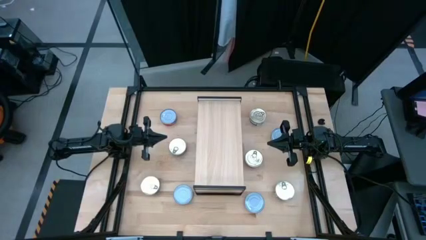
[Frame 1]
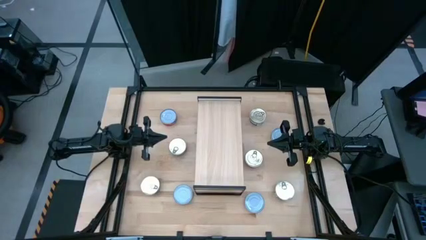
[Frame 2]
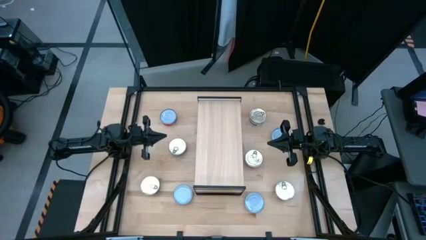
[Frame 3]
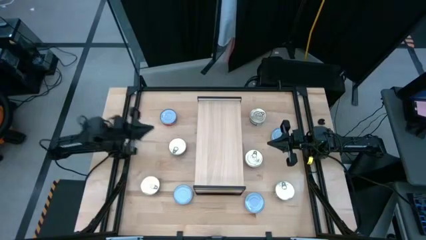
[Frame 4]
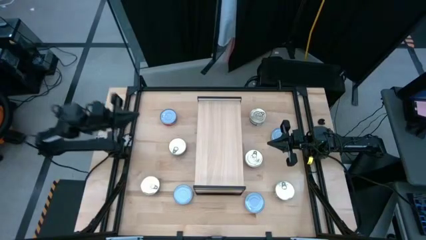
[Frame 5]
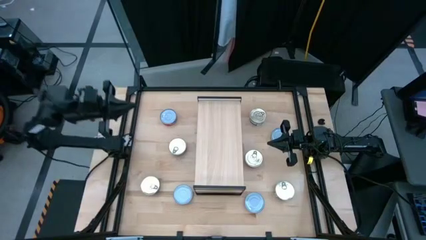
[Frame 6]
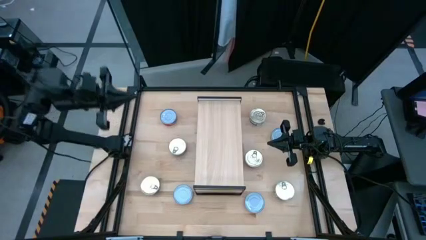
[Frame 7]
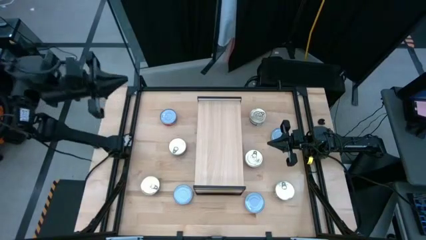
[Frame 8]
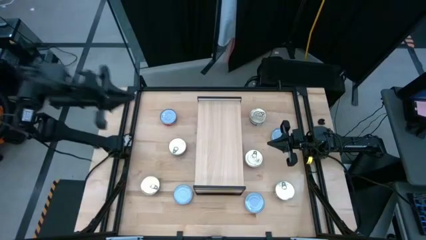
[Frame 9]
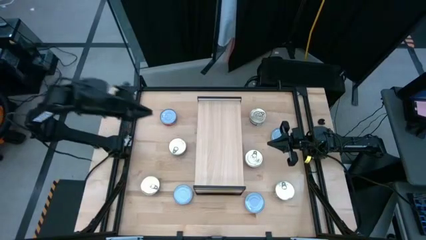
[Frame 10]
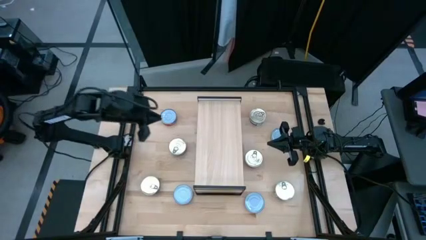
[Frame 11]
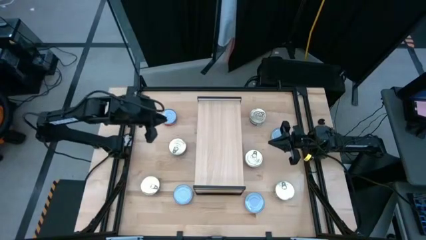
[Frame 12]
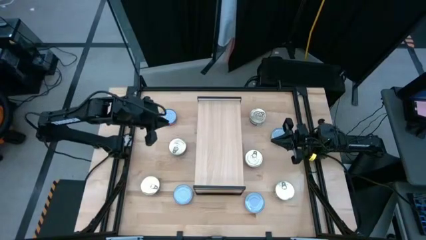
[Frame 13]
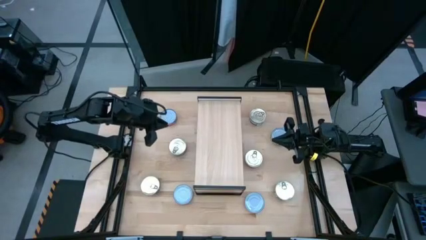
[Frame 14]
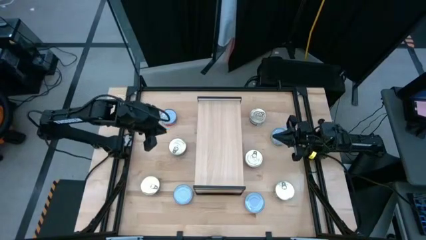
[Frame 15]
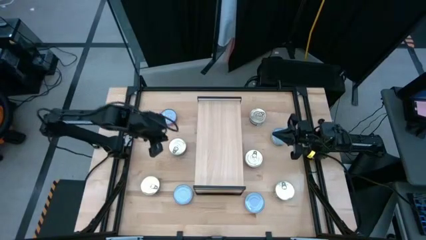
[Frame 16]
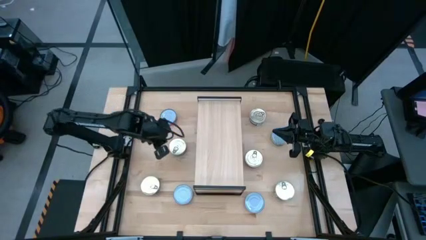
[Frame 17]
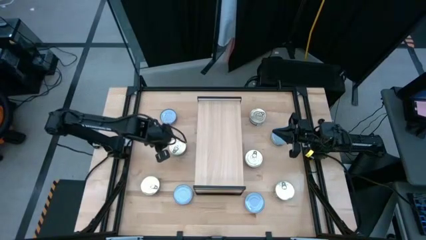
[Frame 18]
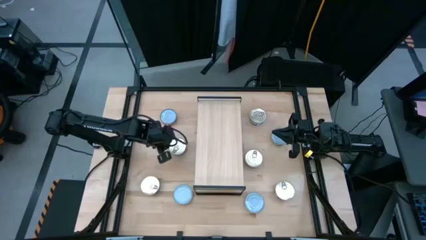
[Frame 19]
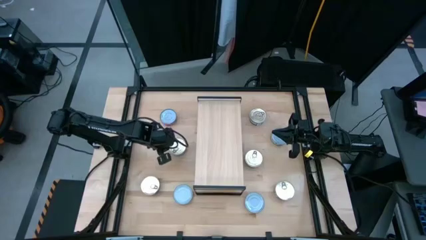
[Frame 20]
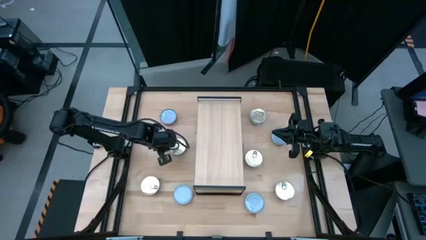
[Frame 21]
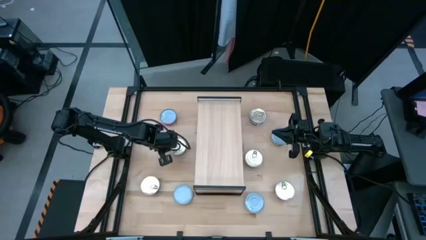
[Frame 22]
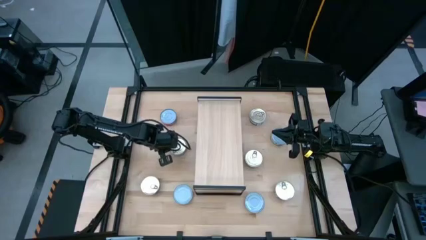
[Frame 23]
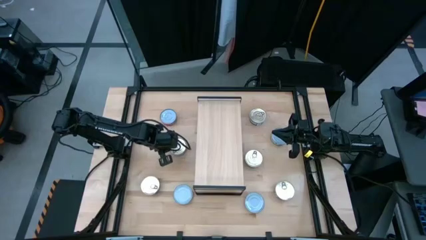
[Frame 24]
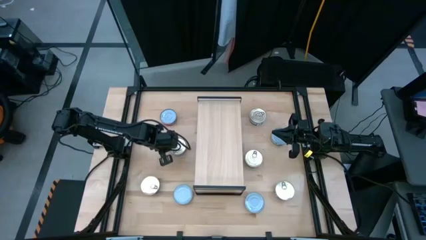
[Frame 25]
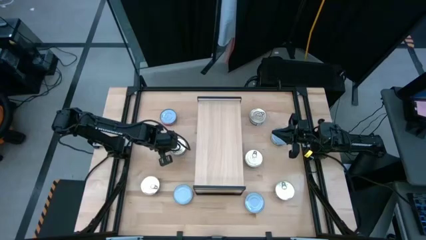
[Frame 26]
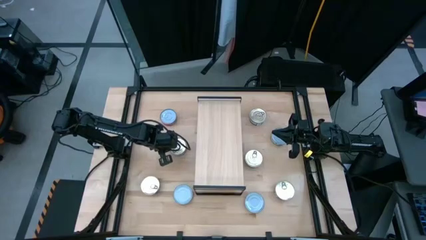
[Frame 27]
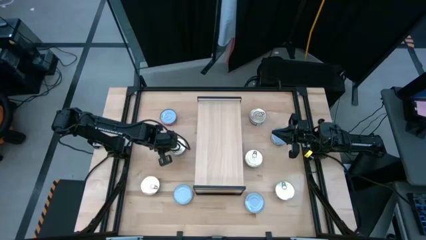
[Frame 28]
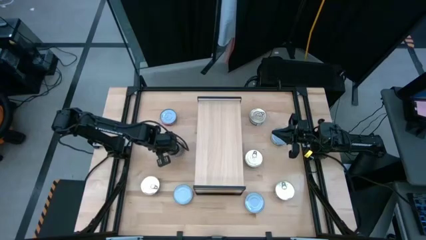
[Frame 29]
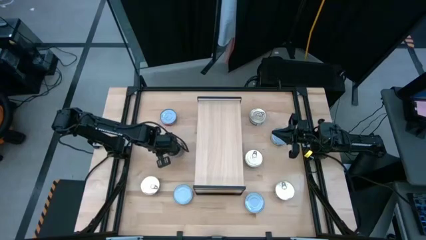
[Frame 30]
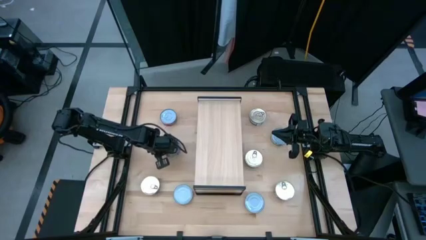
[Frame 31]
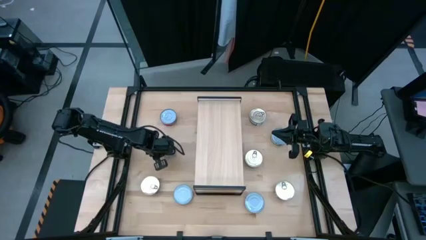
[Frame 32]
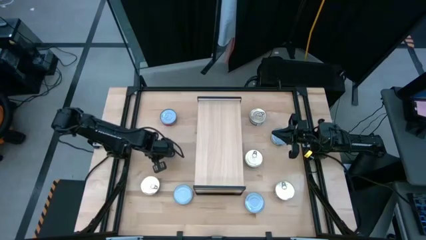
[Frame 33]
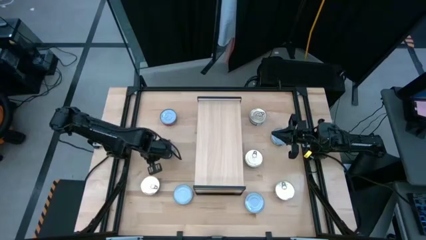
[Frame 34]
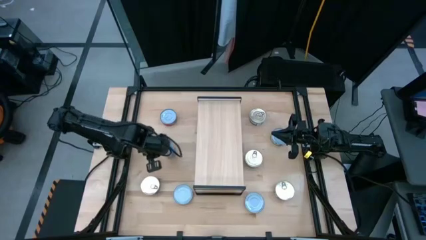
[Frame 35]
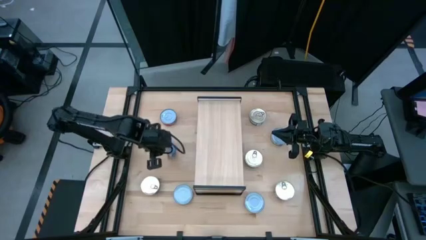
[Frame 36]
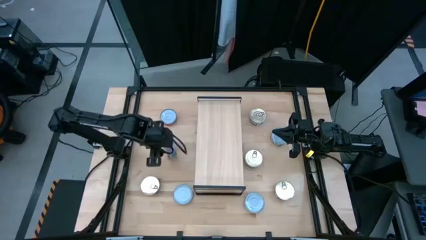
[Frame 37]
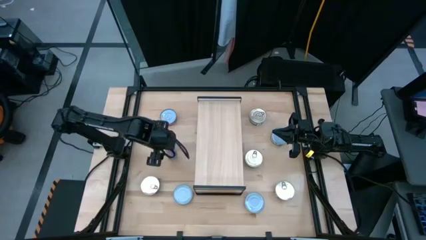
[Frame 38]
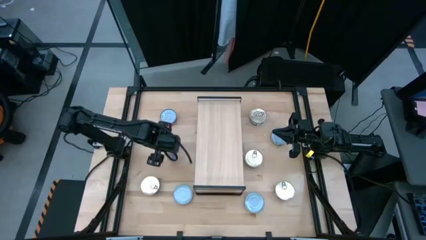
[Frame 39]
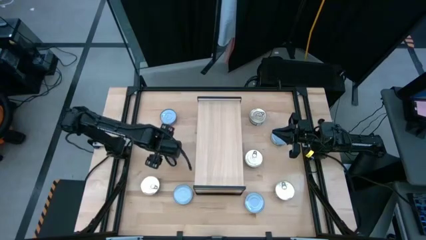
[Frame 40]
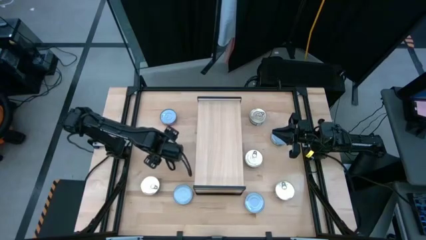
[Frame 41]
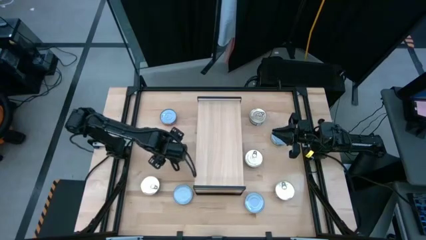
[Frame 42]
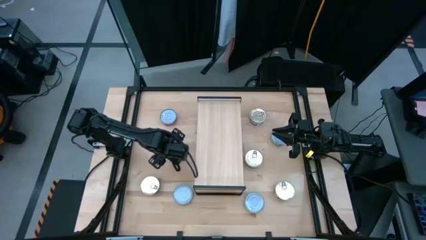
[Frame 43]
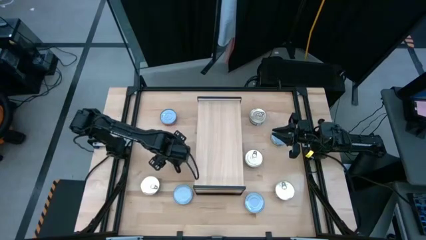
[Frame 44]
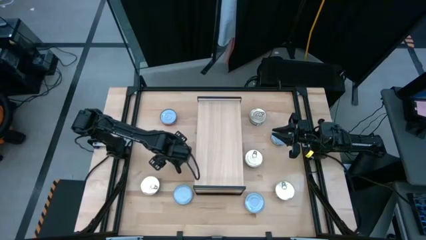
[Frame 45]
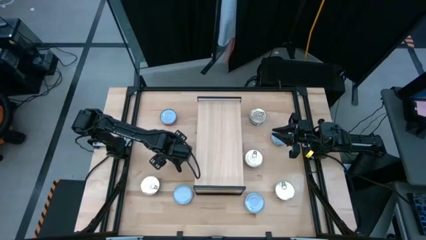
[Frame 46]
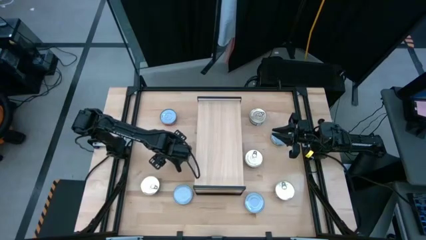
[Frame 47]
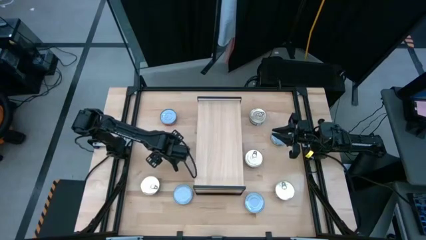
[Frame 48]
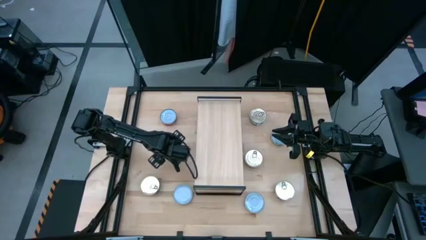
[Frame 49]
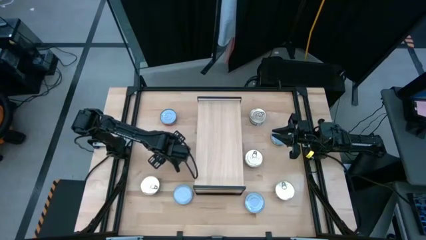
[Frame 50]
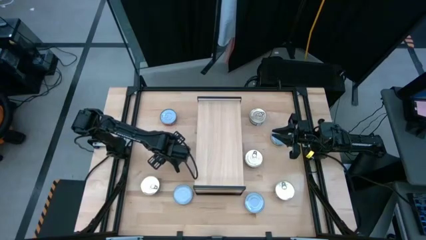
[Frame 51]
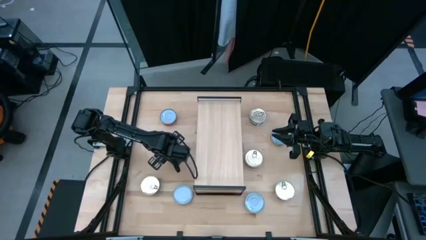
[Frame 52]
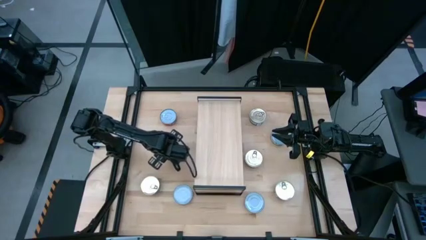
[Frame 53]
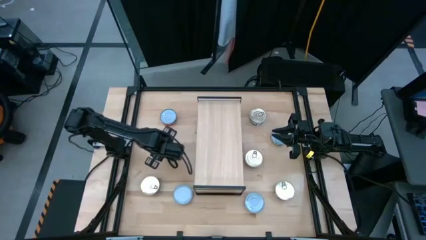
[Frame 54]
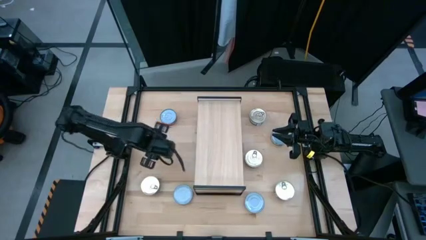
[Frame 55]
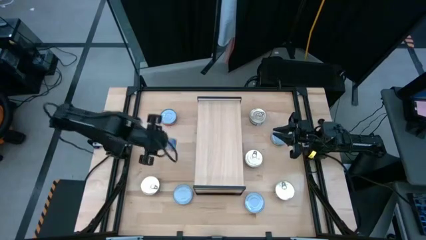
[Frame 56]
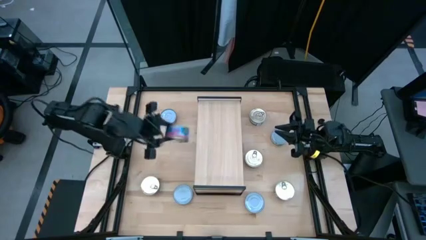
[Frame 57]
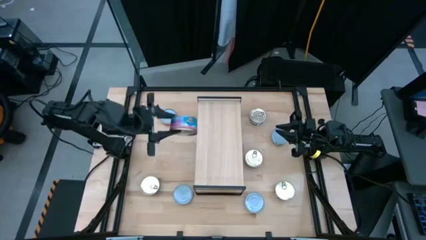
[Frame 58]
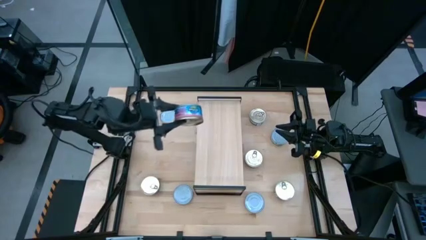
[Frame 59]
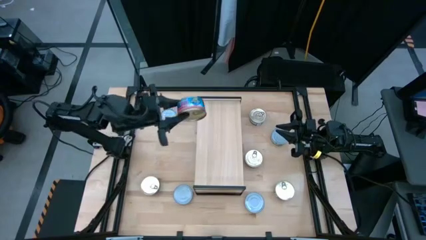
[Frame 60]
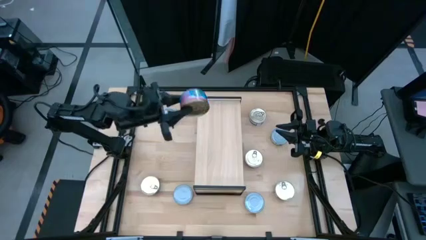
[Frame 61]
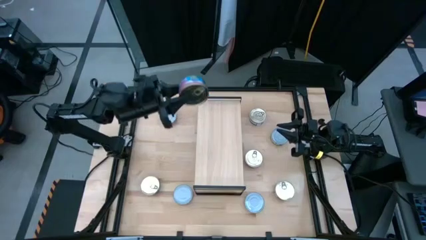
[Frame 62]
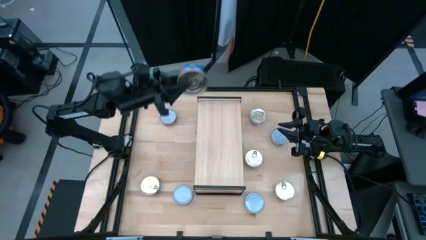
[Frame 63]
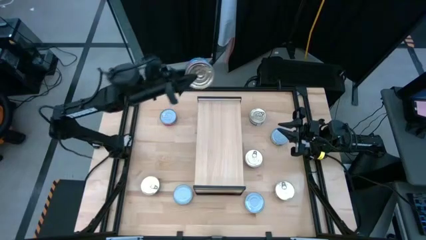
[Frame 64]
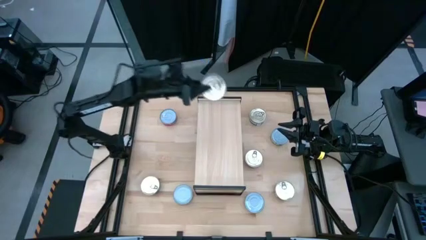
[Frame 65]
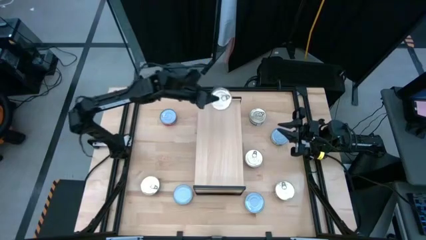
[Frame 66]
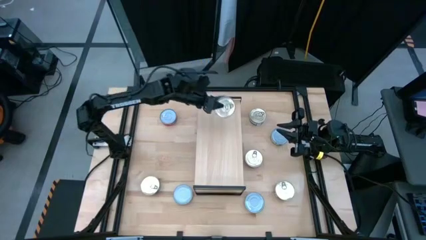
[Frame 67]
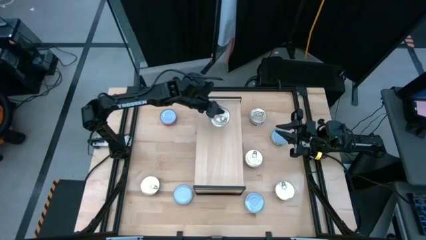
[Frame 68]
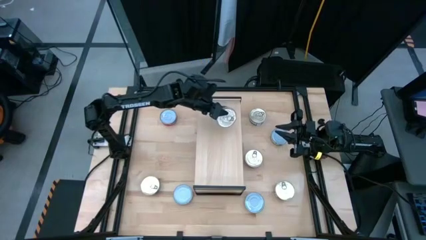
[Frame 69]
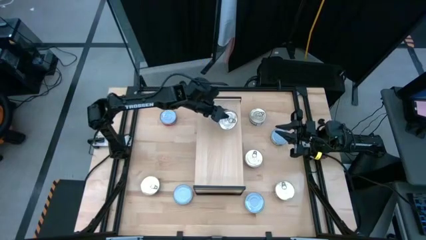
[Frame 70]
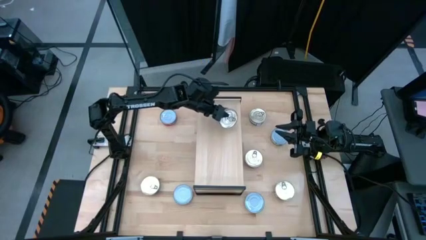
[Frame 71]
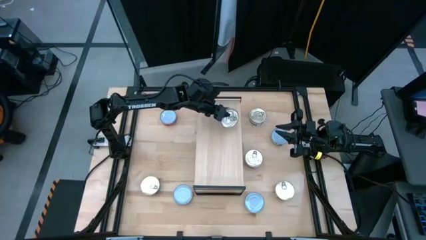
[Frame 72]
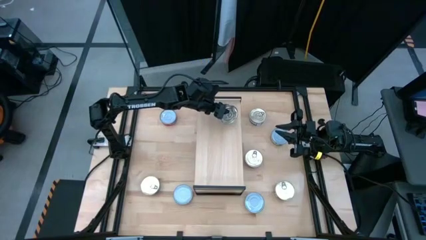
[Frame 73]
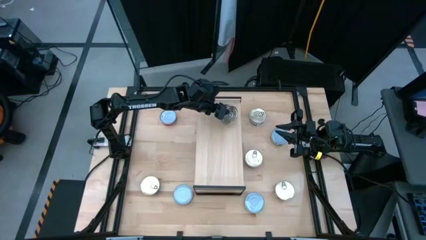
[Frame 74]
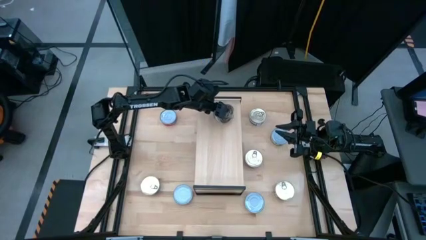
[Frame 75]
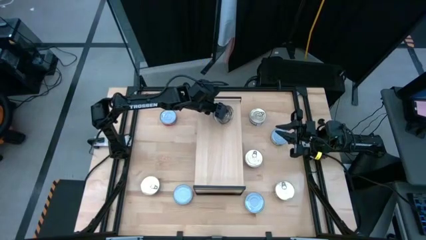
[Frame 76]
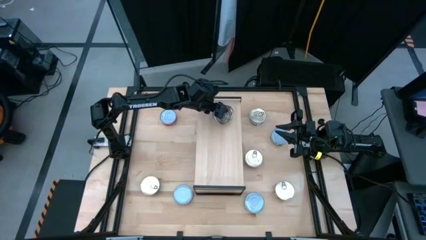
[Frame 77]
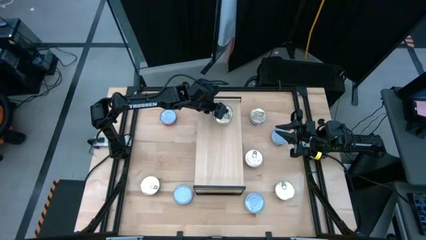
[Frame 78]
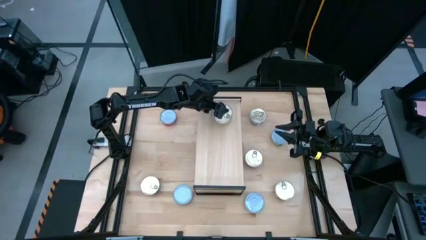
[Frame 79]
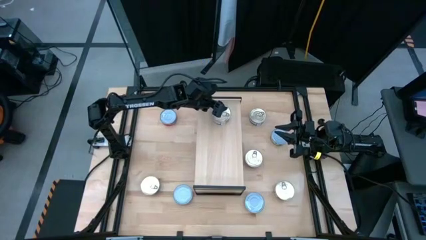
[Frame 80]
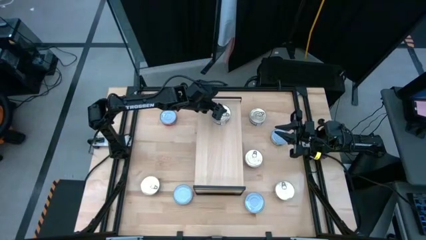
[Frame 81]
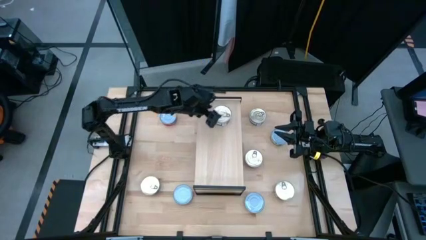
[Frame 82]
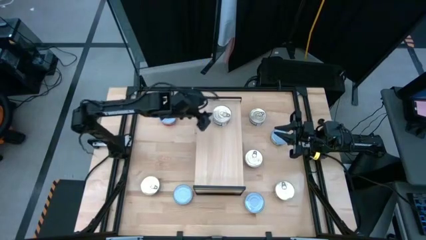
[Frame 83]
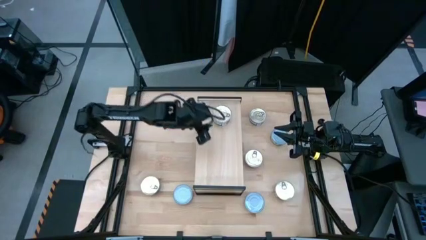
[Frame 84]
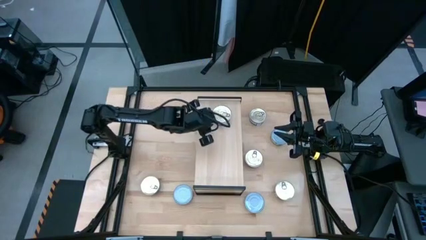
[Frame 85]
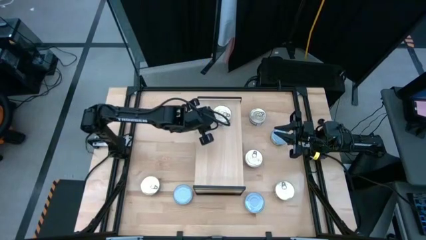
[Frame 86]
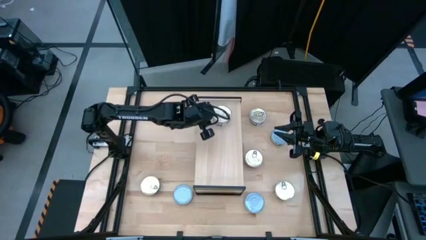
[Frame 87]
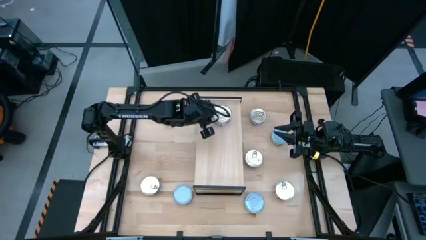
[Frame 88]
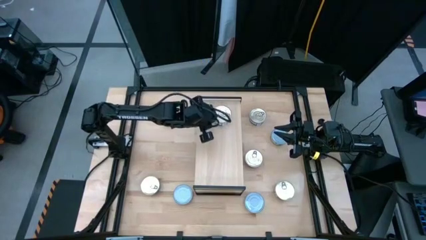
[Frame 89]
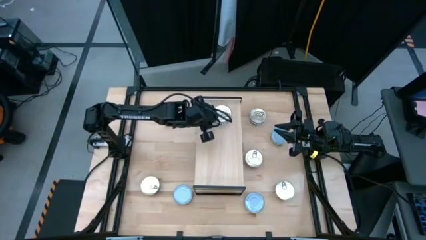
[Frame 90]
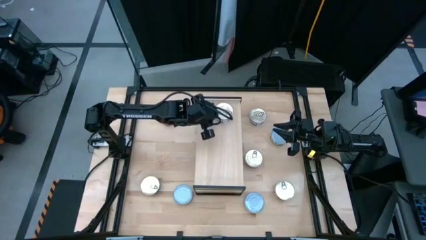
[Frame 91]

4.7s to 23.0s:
Task: Stack canned seafood by type on shelf
Put the blue pink tuna can on the shelf
